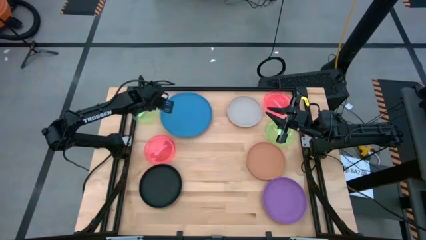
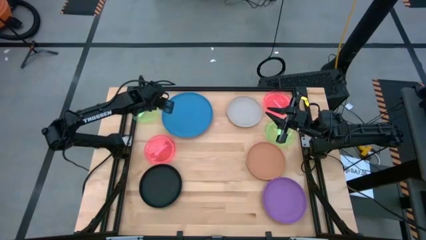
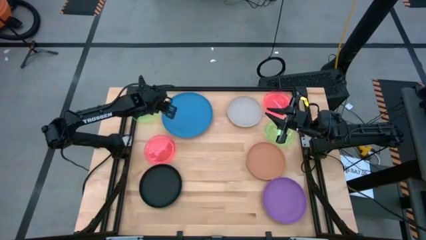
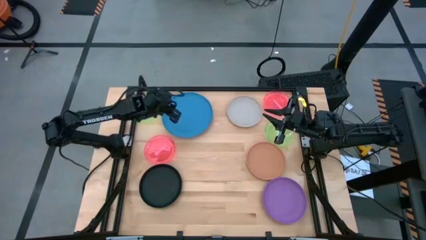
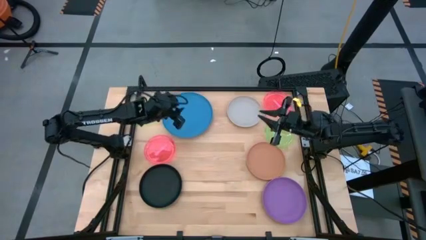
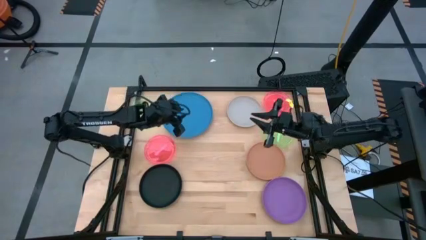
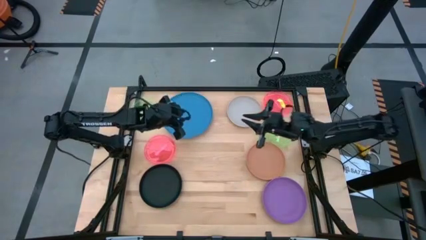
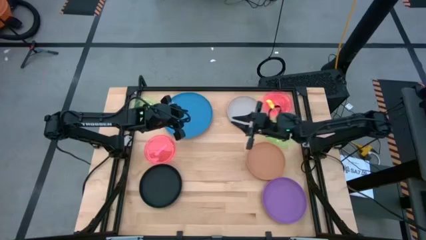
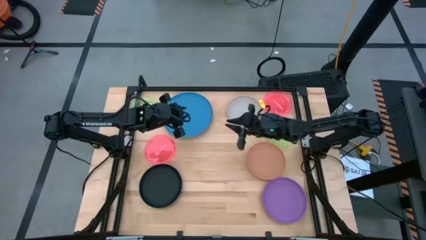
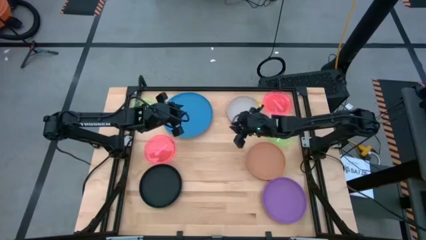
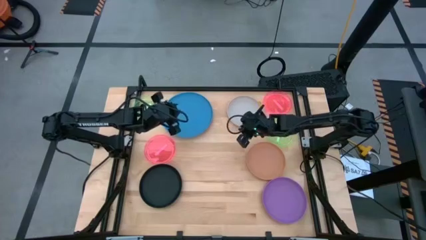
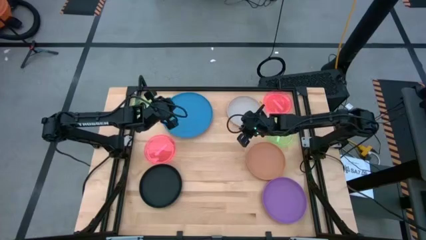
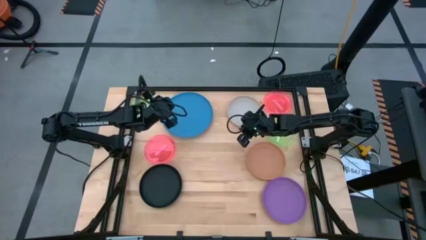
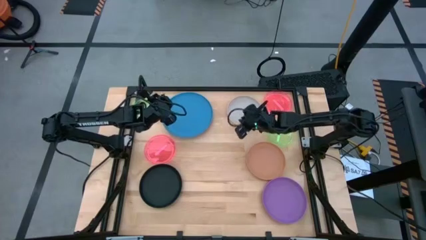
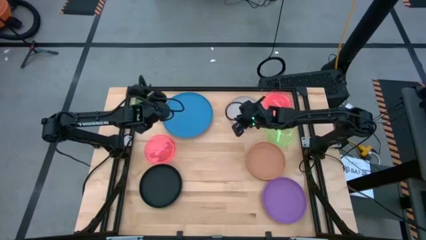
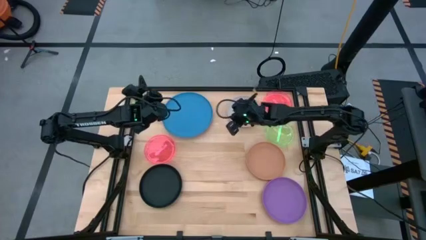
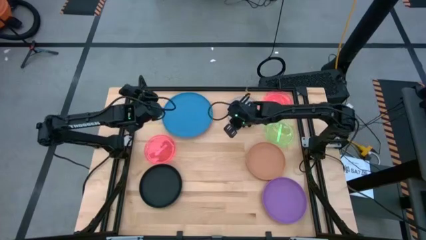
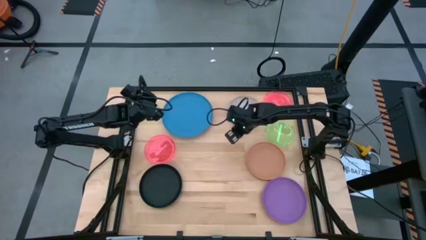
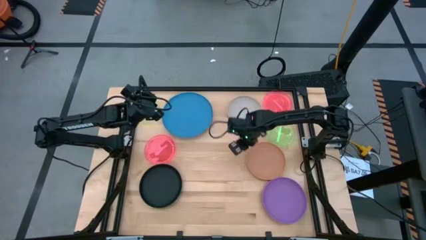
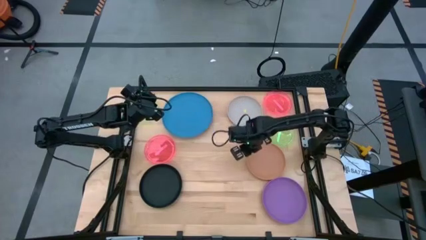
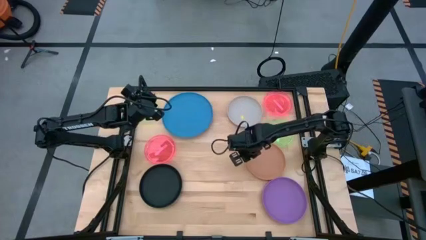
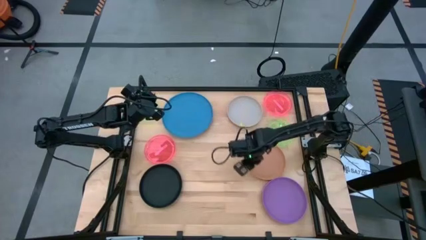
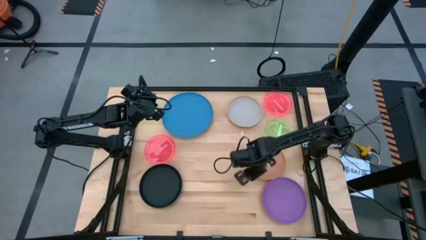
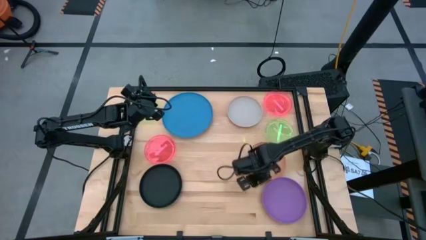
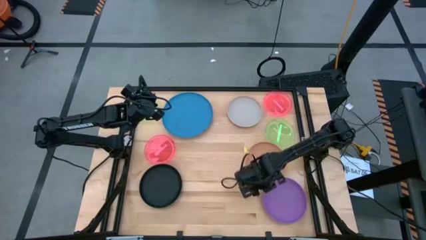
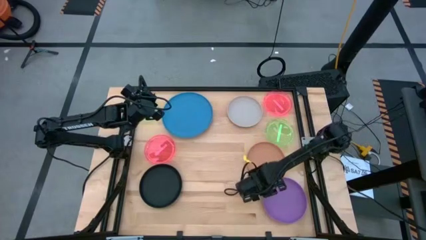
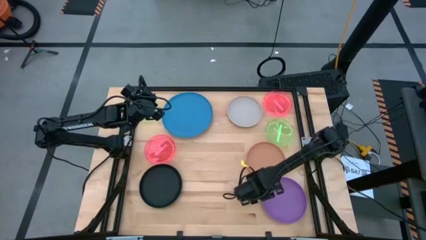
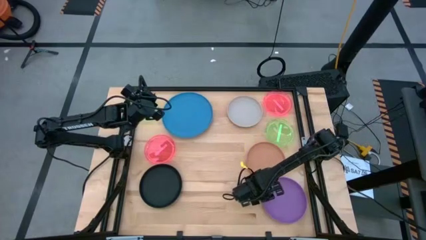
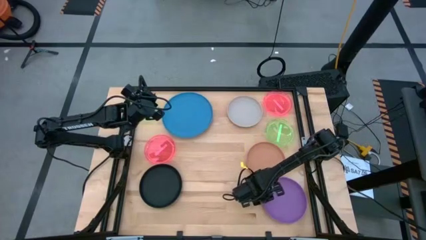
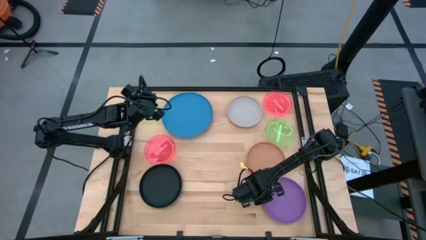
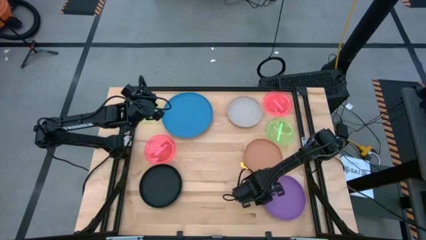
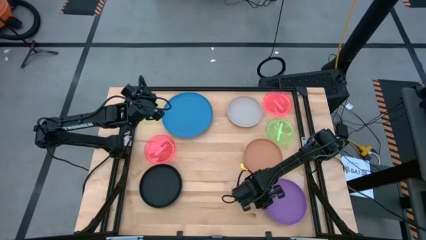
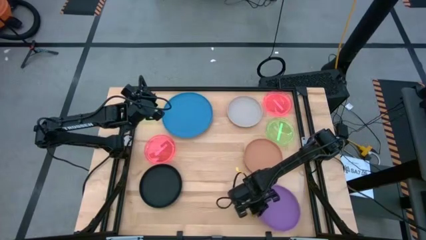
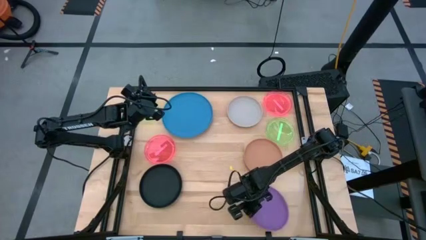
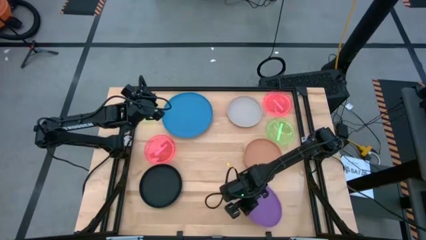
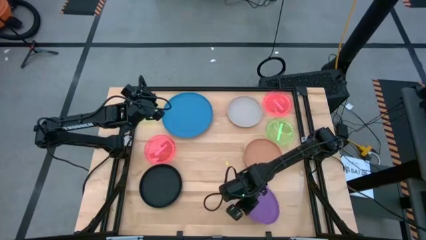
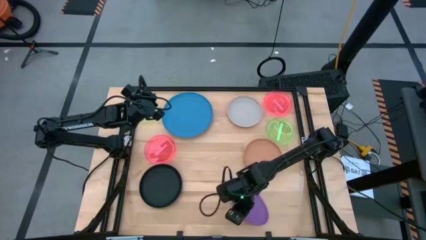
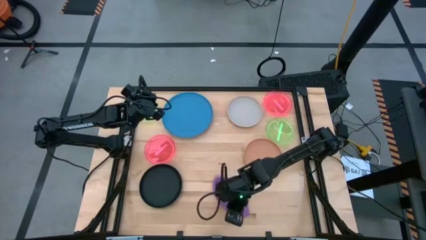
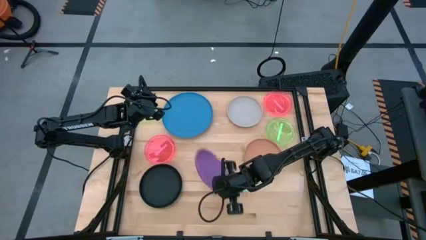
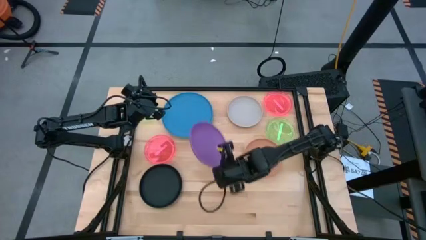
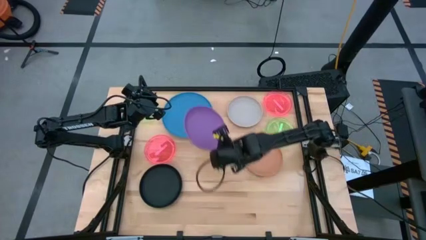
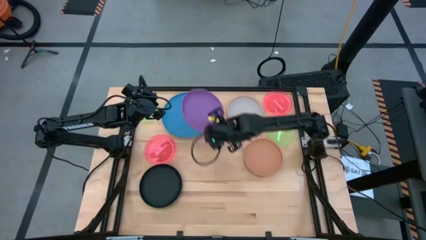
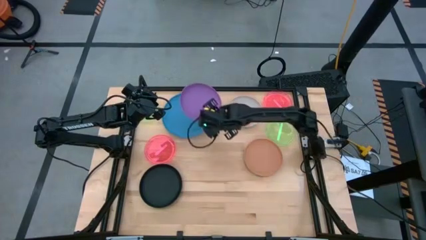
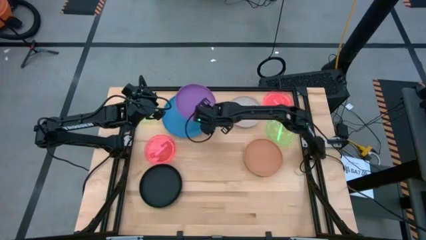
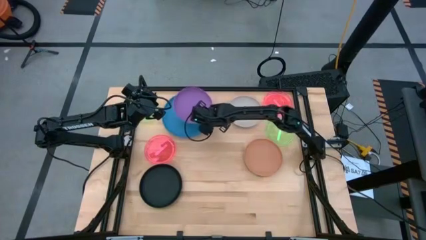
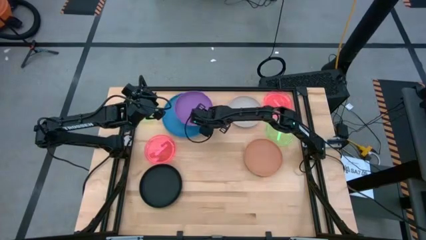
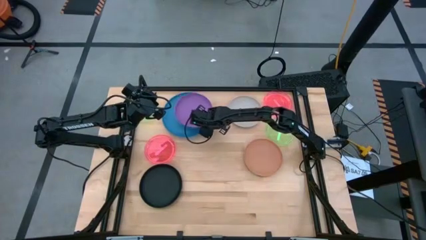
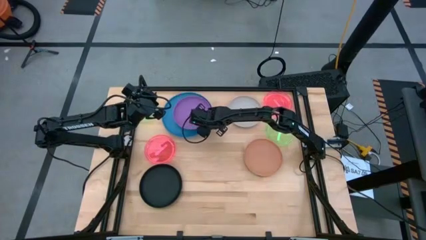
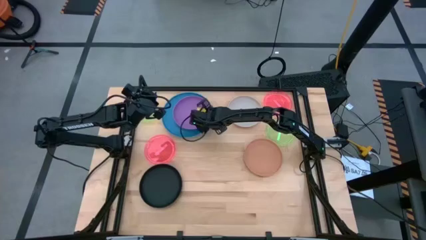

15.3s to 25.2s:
Task: Stack plastic plates
Stack the violet plate on the blue plate

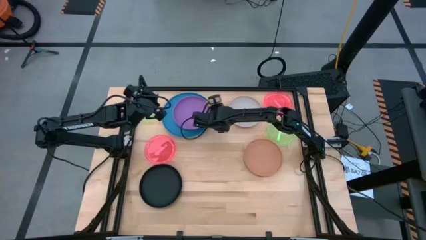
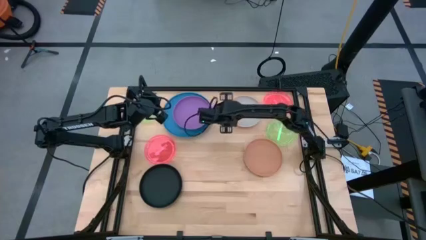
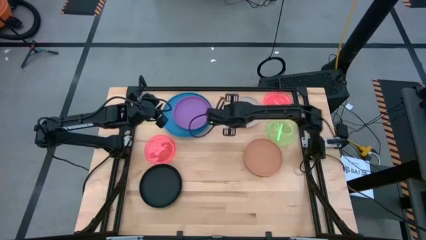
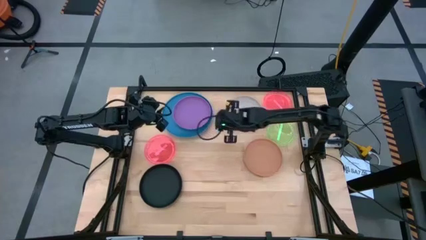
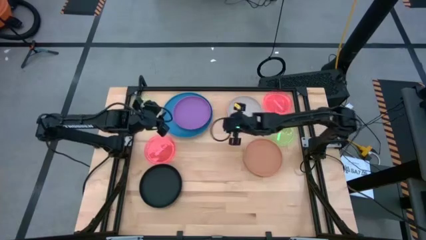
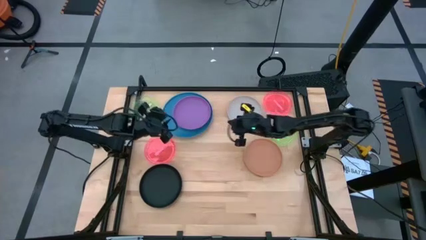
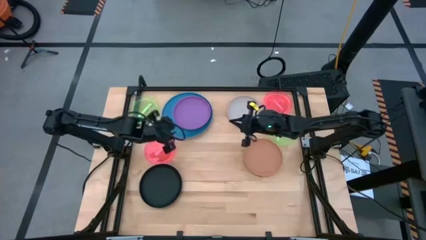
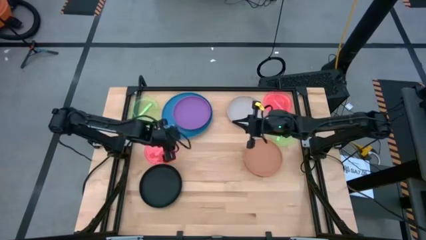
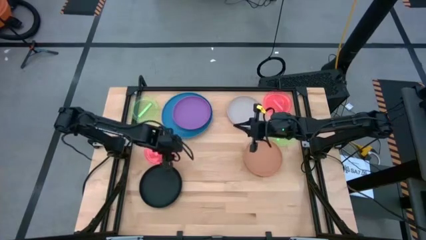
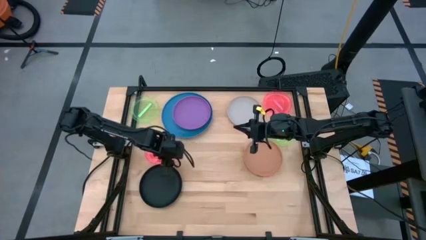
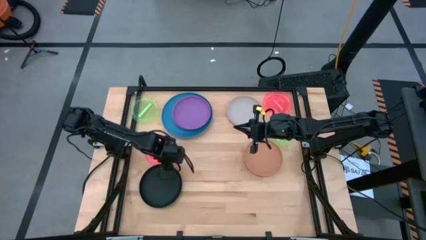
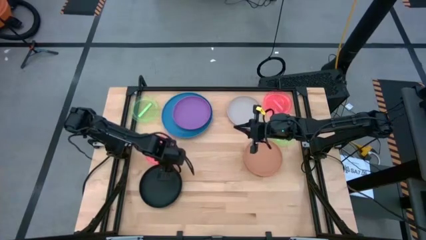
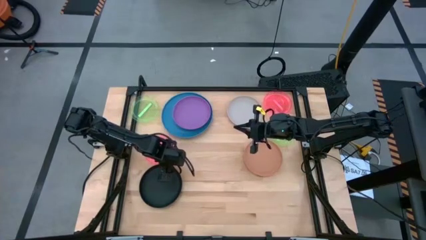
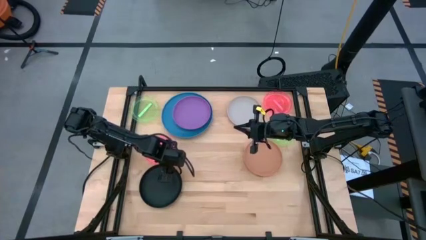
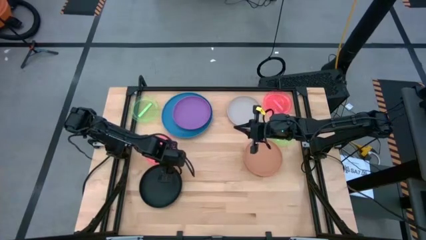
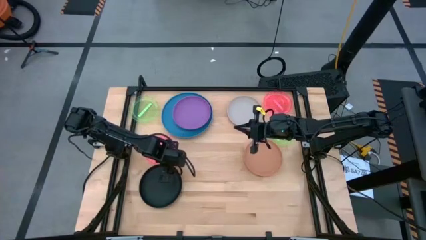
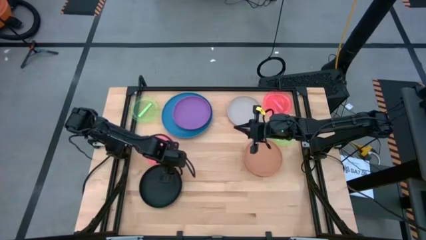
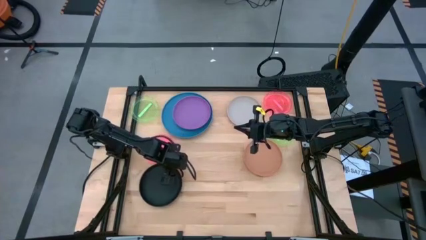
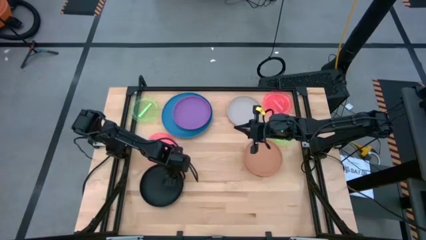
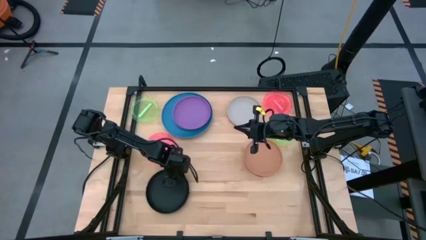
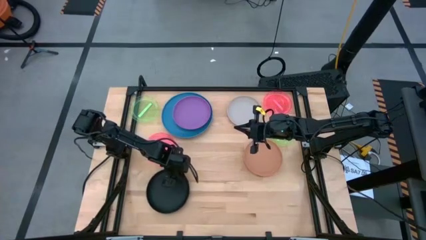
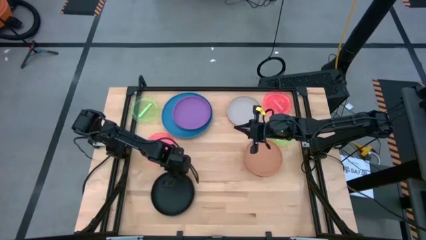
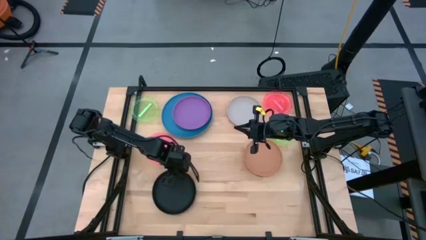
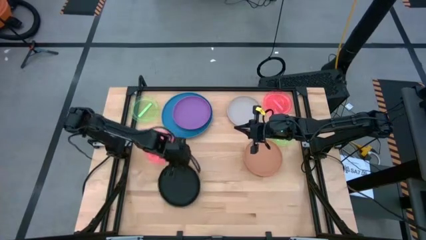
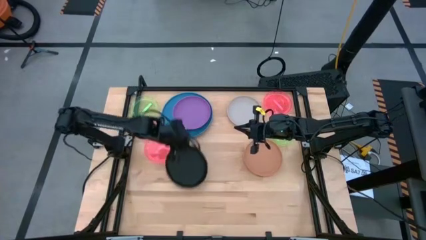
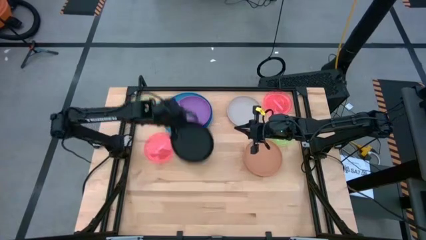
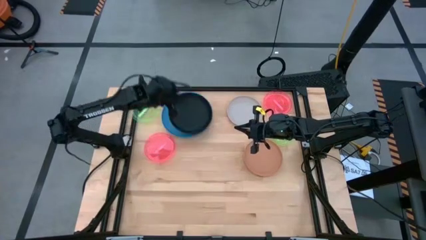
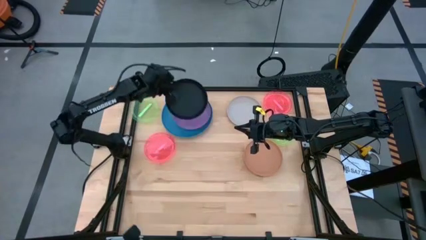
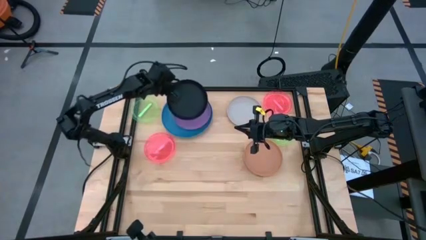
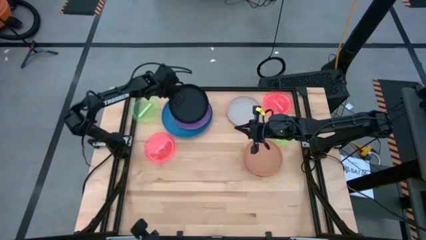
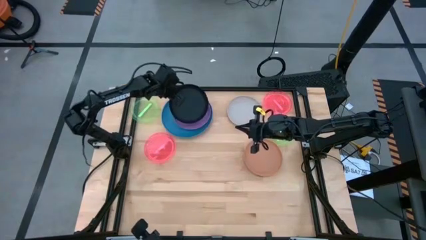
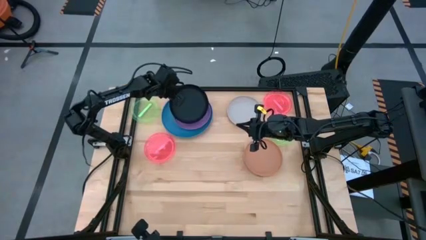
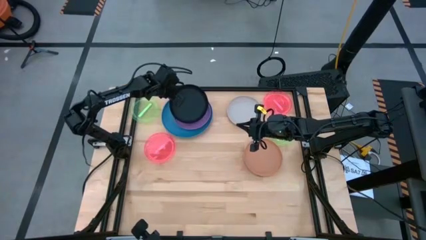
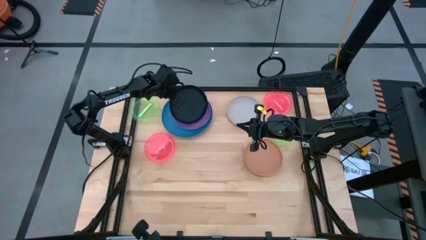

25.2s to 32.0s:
Stack the black plate on the violet plate
